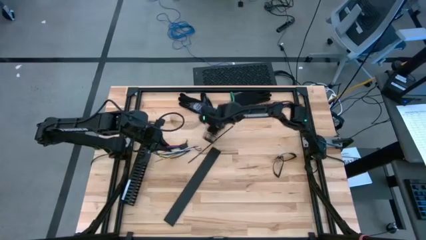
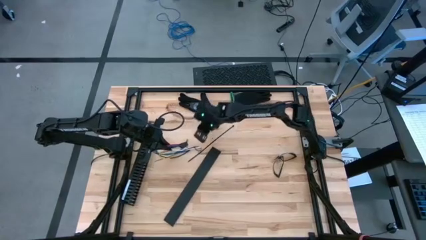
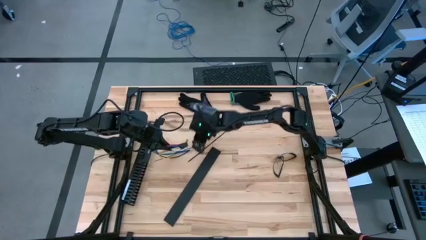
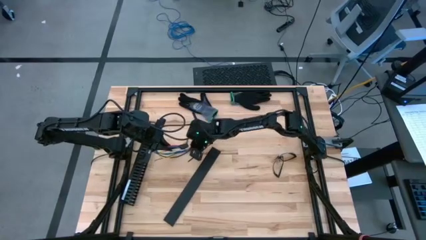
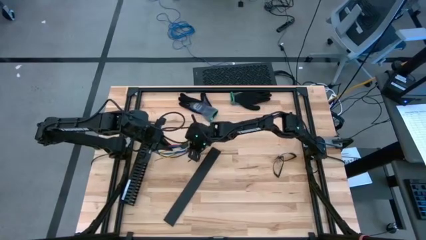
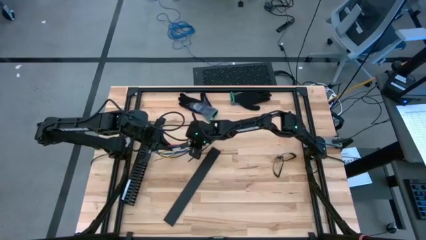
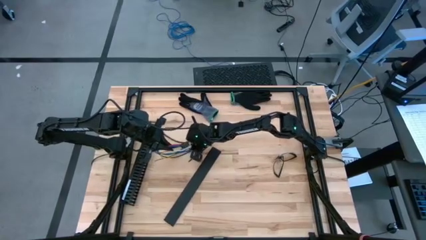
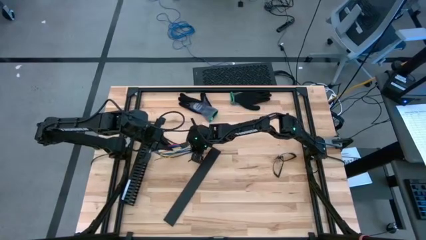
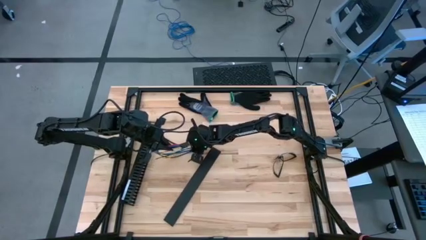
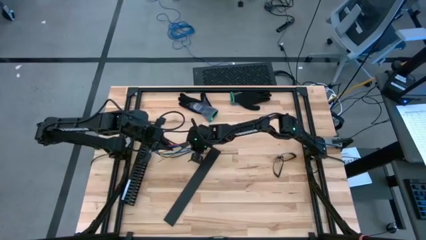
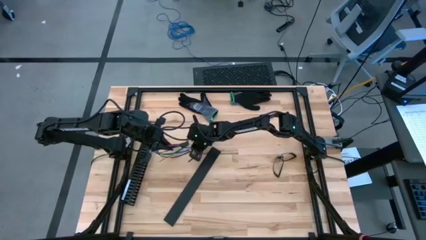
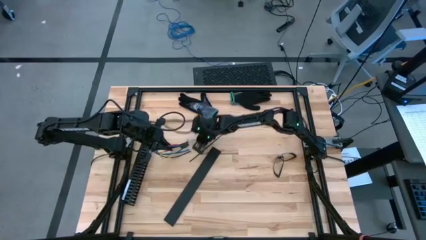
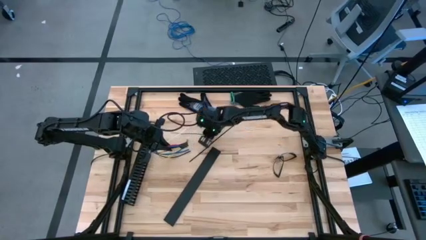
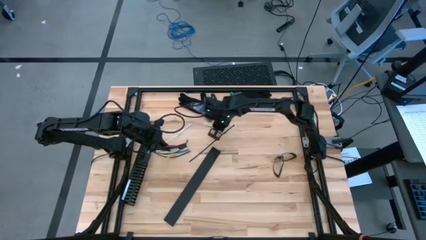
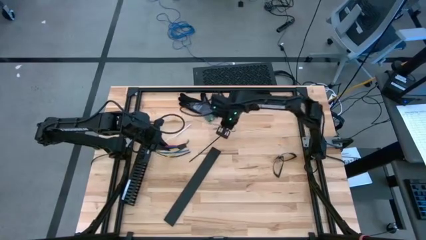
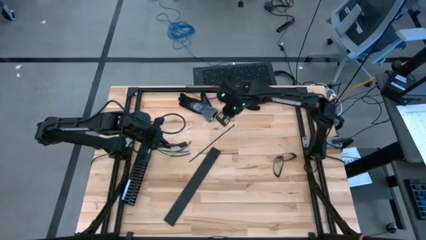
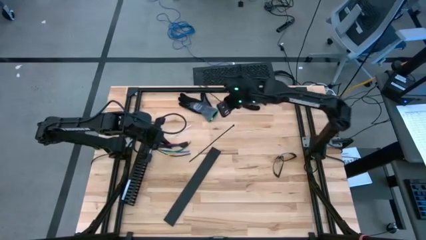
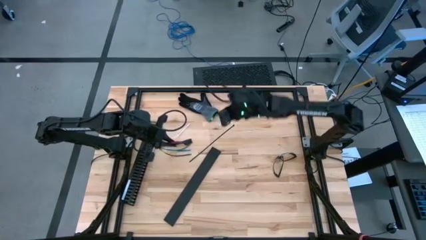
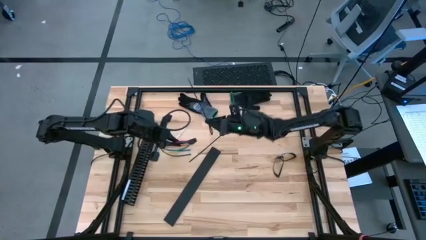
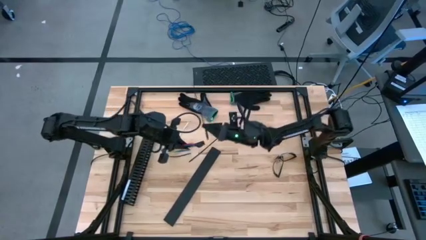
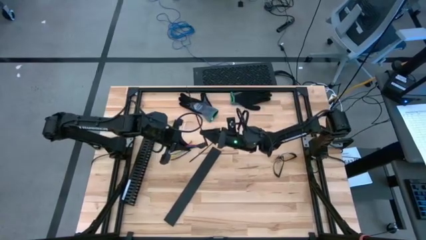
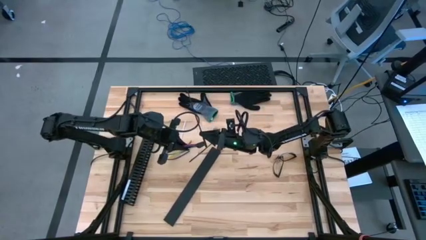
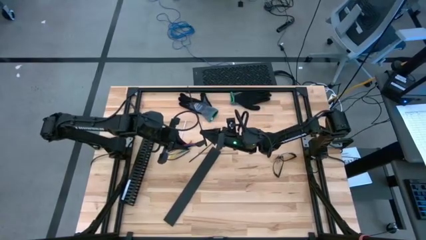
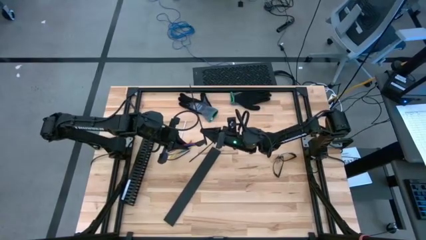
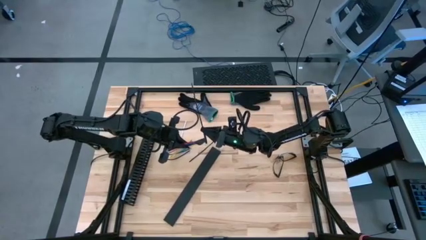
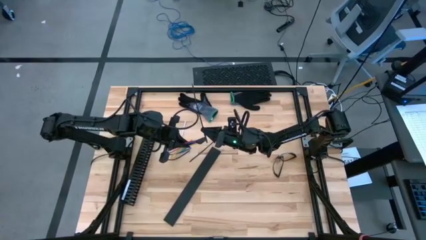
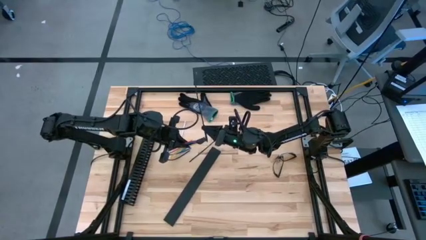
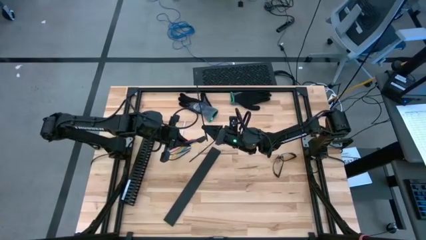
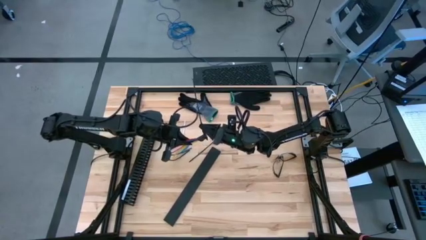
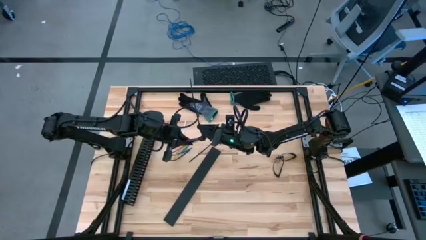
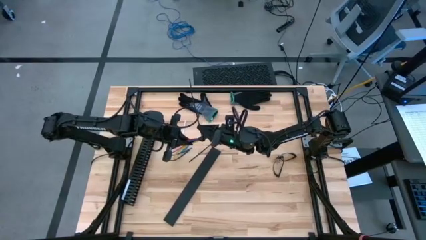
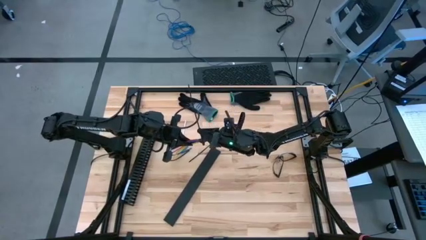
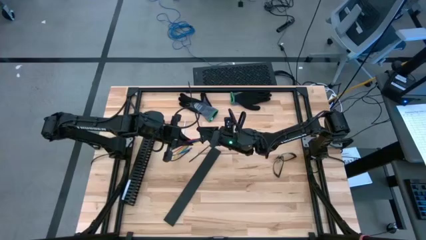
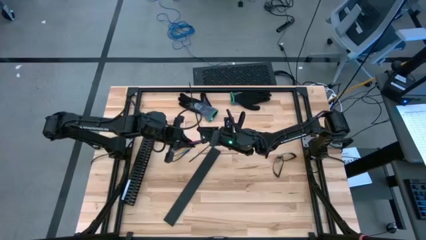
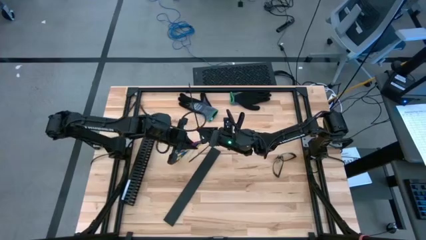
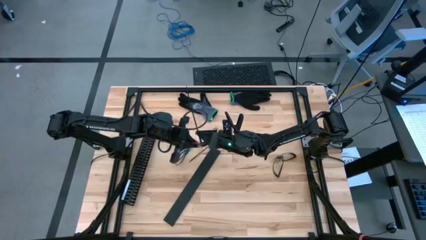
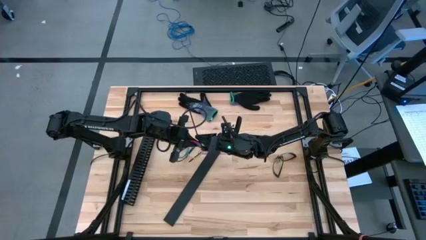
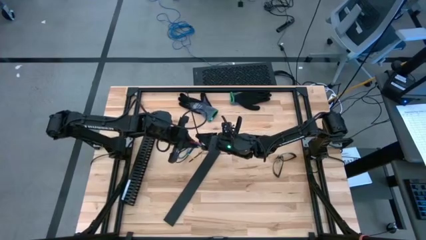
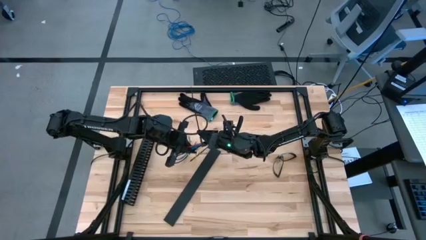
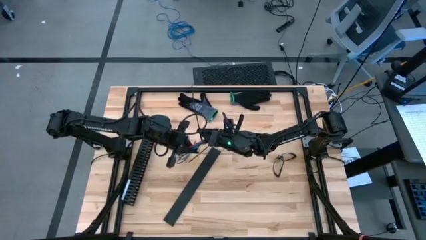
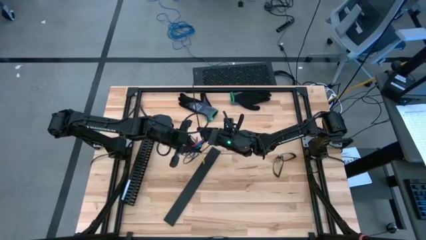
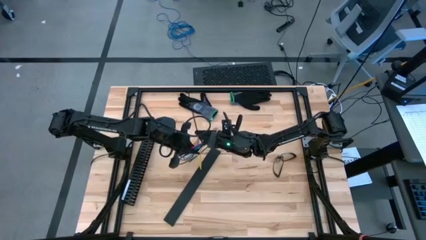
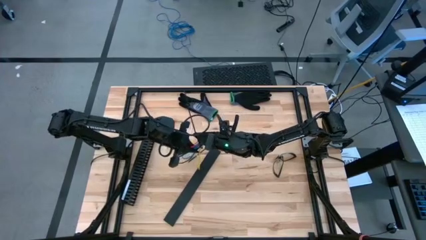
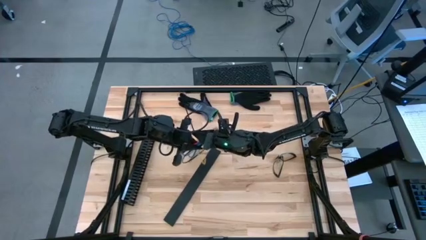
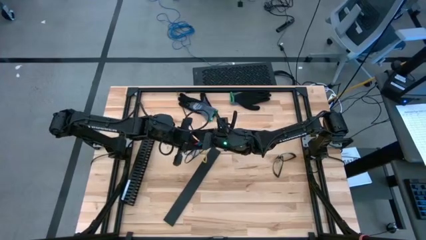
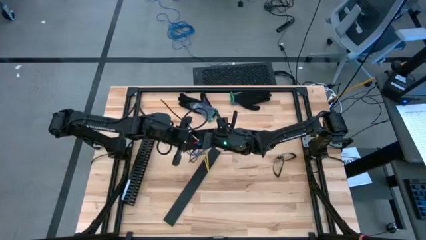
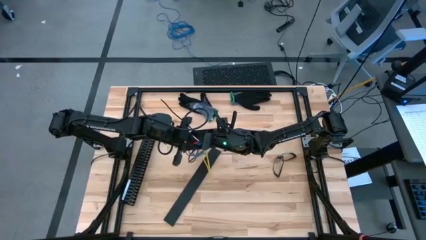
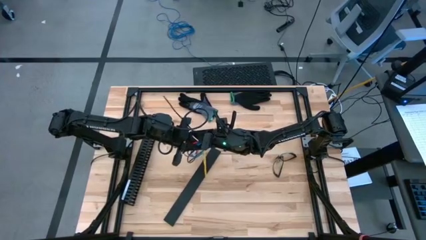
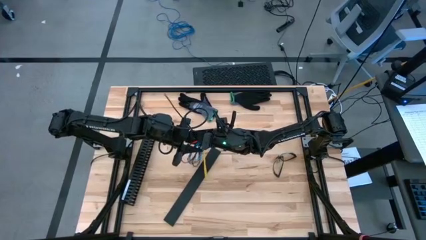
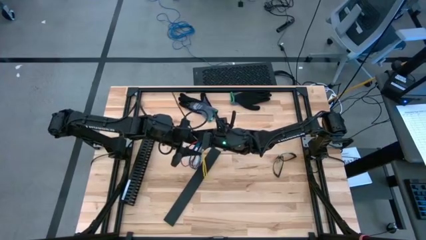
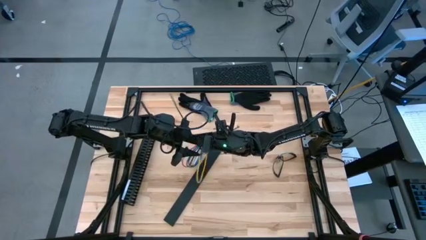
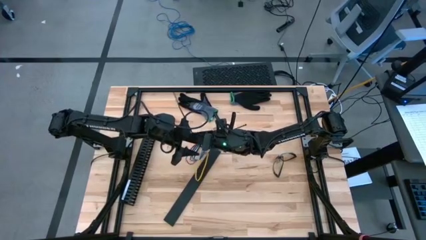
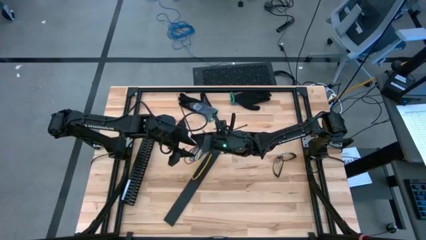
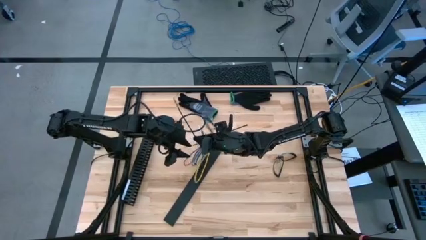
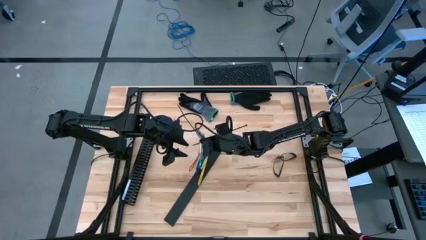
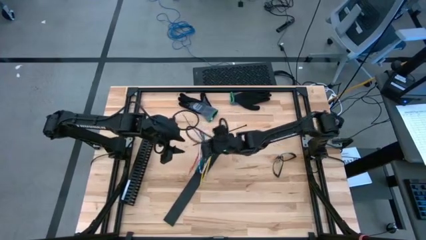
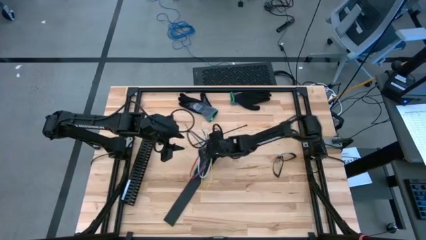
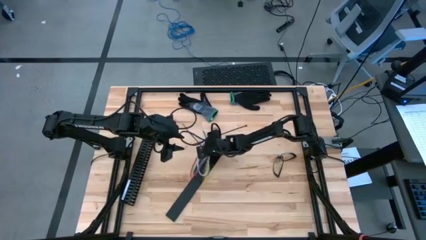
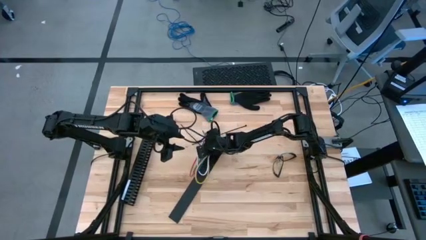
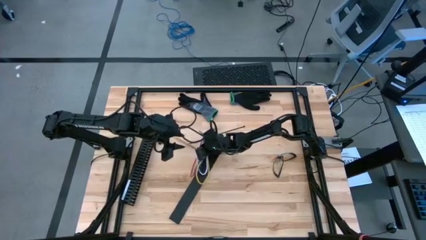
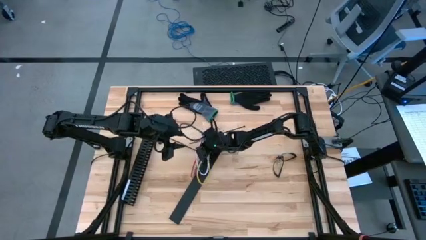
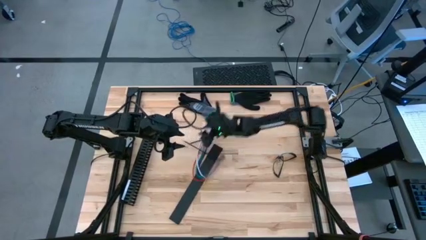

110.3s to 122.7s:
Task: Ziptie cables
Insert the cable wire into the zip tie
